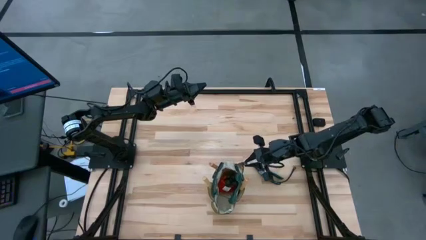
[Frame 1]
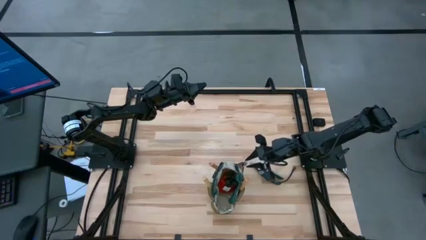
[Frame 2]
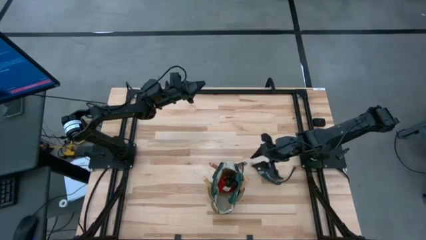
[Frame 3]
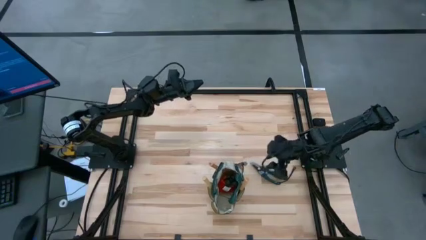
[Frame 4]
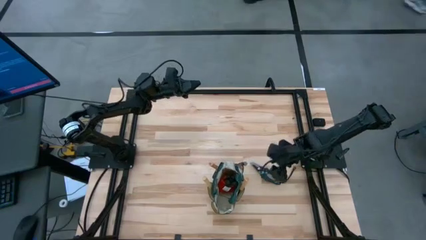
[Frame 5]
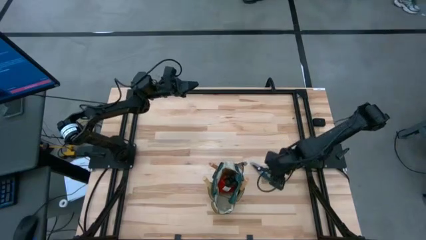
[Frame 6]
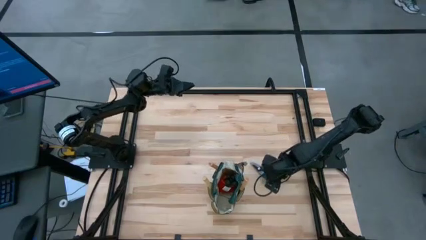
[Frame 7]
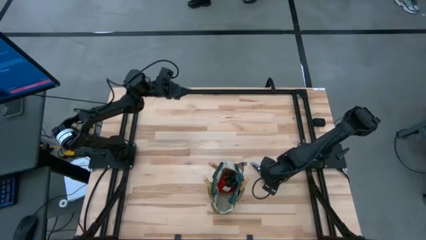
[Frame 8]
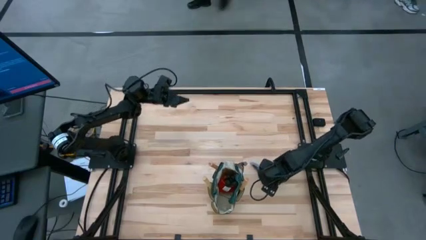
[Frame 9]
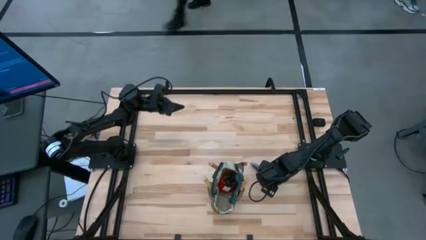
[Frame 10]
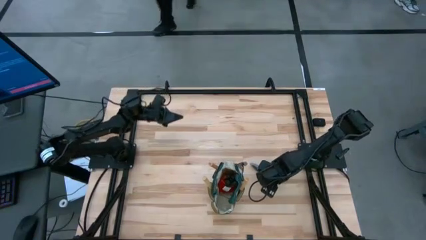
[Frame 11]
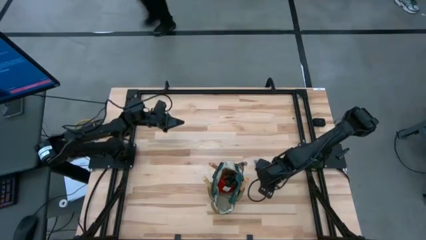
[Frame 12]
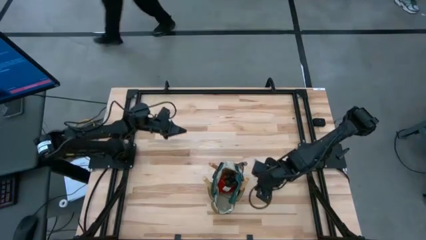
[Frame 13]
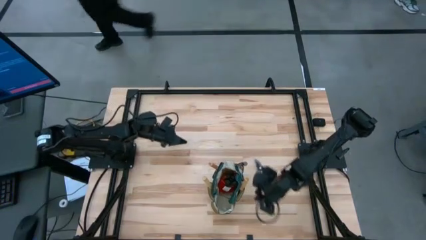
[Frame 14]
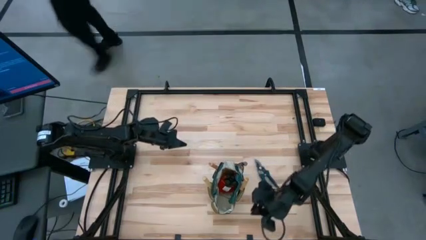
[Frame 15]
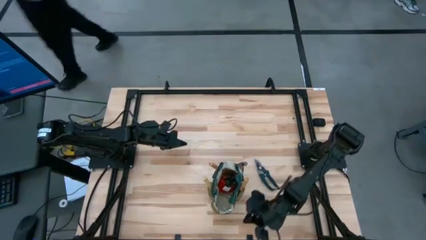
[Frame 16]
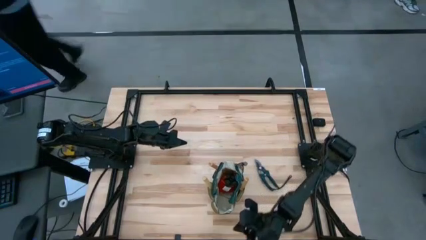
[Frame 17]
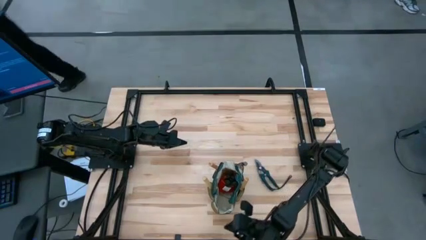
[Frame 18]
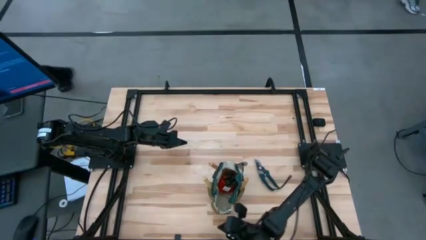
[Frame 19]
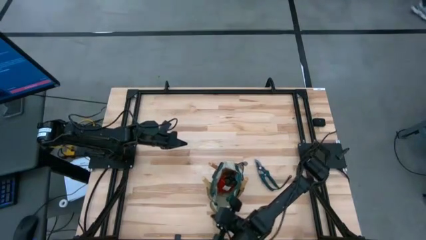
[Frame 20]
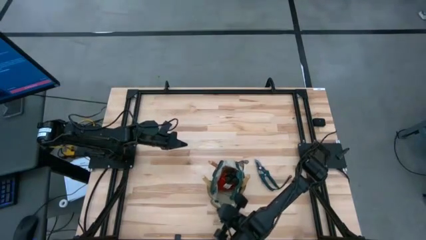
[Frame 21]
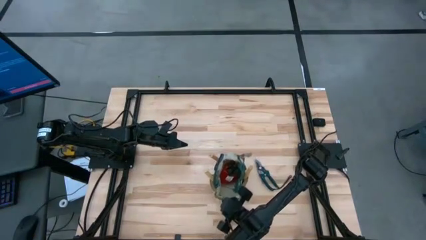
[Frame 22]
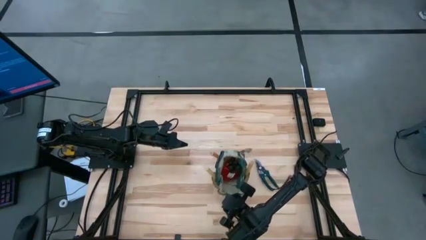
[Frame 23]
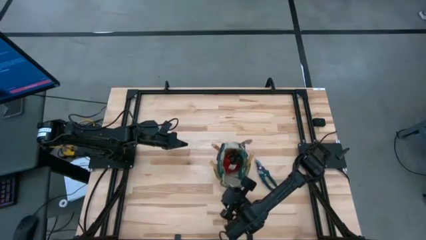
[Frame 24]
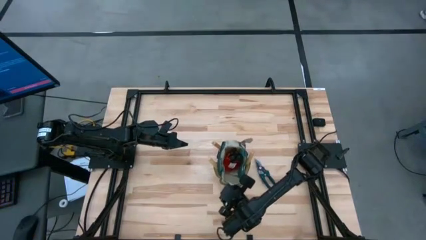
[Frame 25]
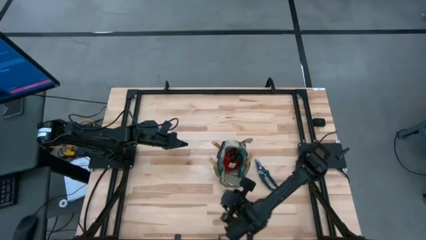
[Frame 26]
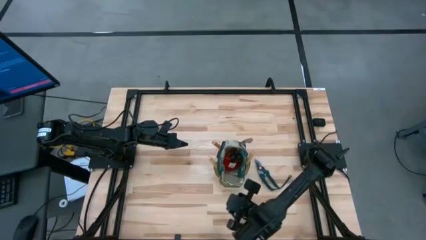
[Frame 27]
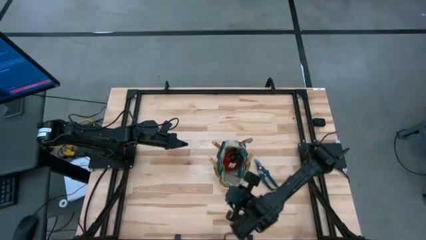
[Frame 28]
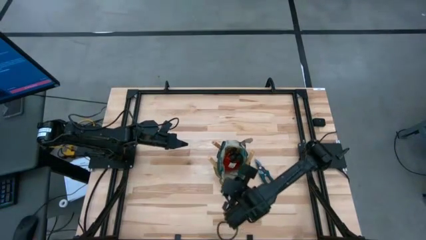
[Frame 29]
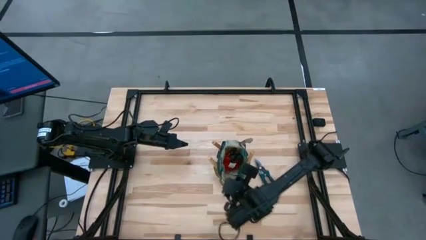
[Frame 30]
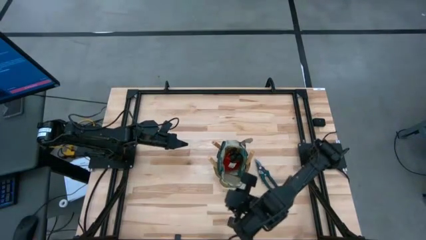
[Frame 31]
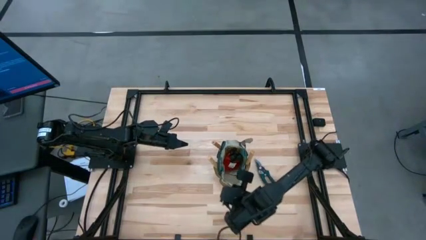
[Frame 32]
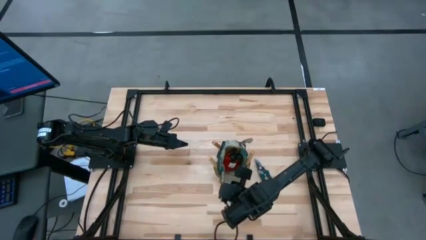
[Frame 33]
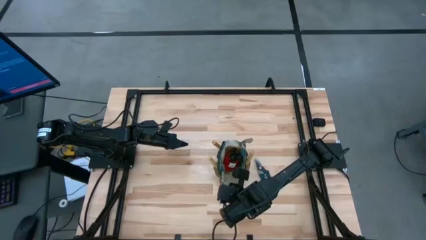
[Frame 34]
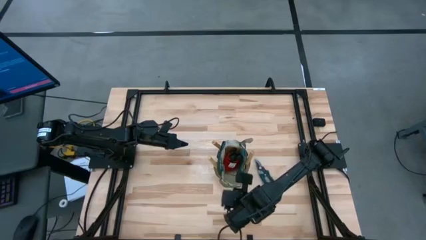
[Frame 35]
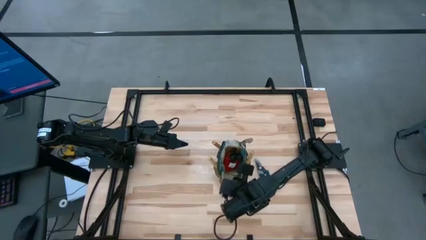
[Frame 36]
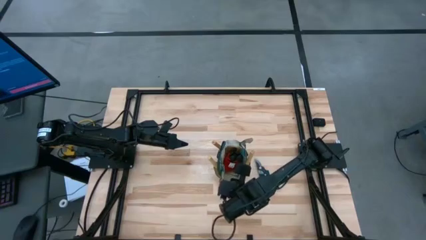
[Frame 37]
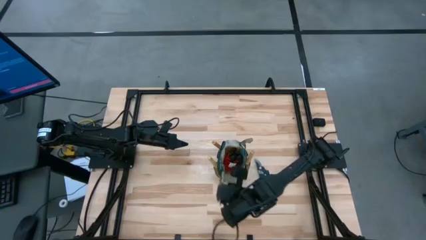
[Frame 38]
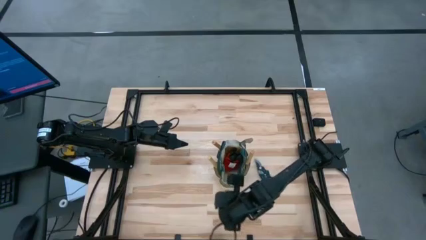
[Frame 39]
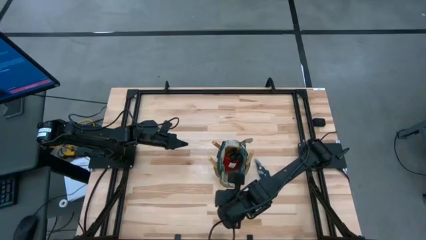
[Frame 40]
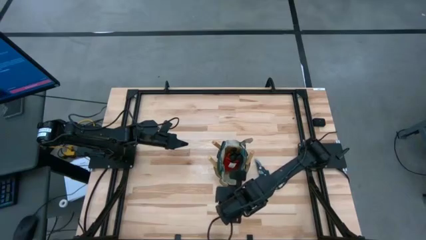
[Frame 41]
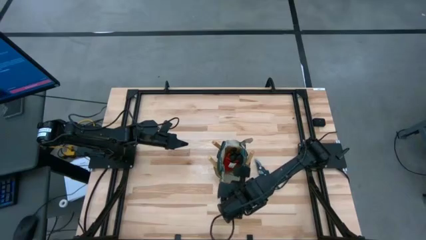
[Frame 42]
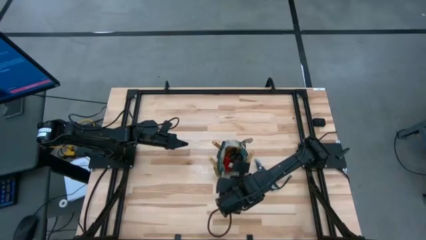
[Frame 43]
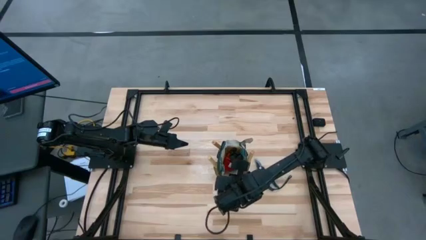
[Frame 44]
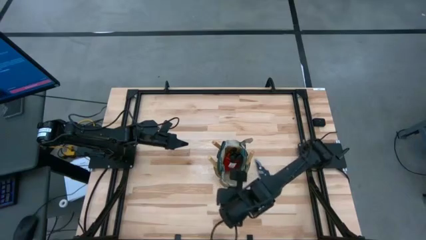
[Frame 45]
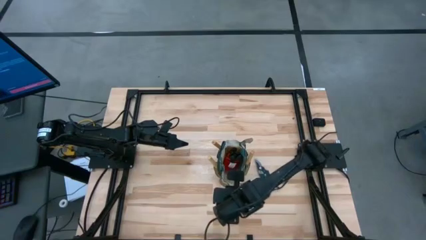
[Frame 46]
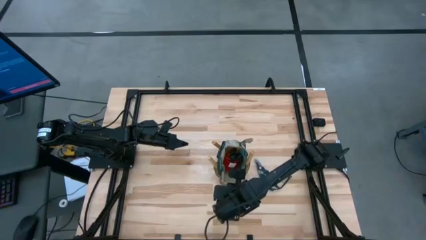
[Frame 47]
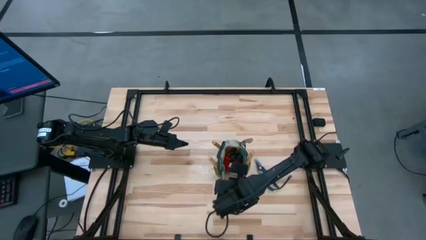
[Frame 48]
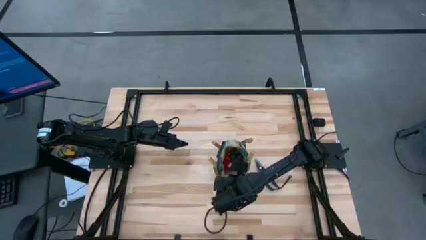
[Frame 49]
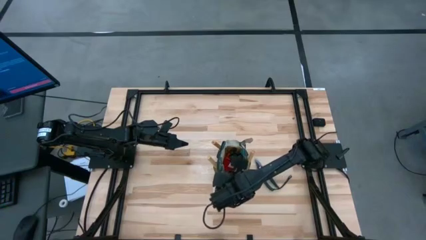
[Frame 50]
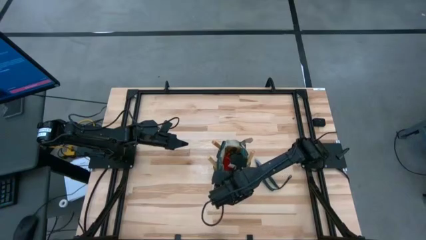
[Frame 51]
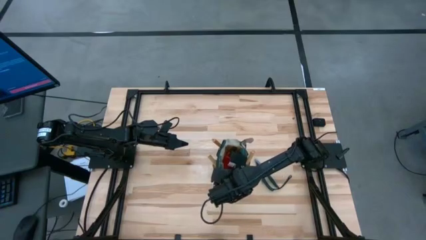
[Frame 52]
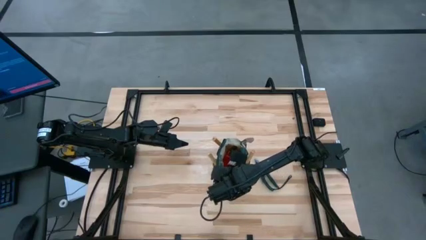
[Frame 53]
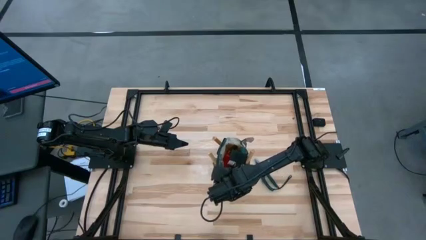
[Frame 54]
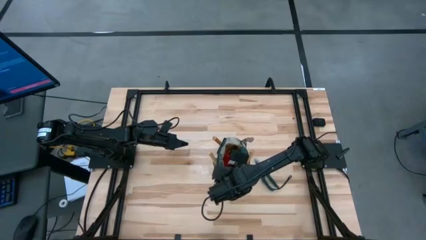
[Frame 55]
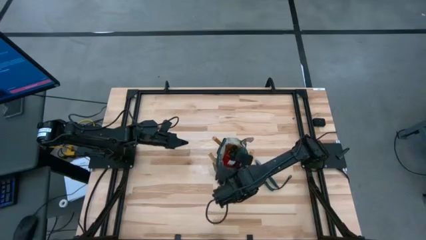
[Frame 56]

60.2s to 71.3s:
Task: Pick & Place Garden tools in Gardening bag
Adjust the green gardening bag

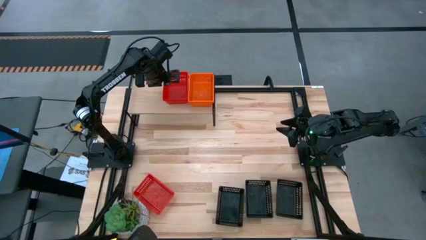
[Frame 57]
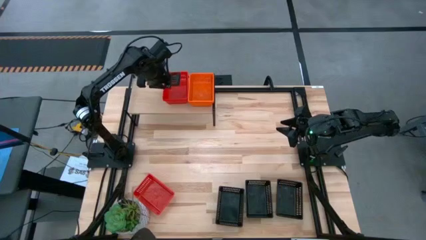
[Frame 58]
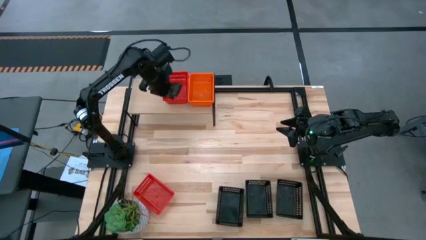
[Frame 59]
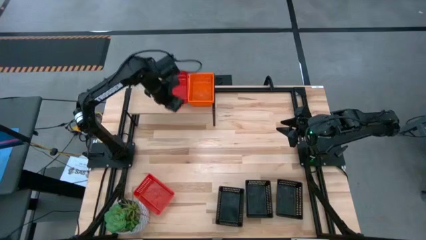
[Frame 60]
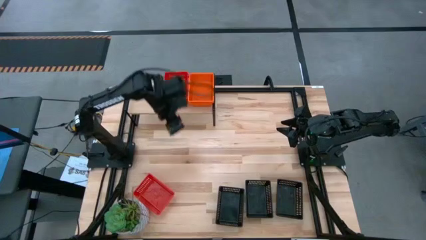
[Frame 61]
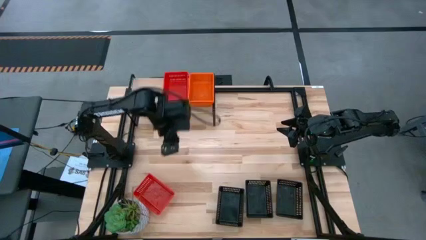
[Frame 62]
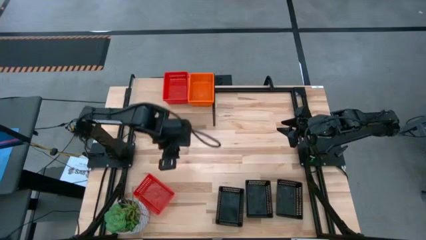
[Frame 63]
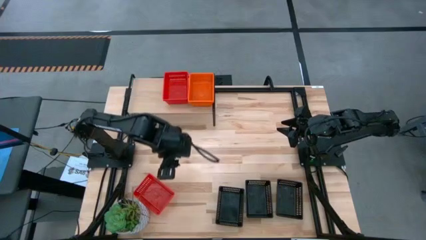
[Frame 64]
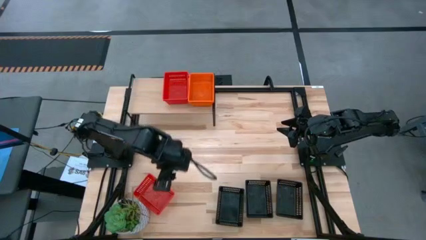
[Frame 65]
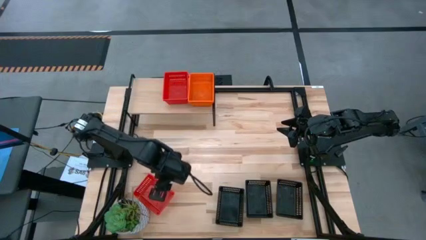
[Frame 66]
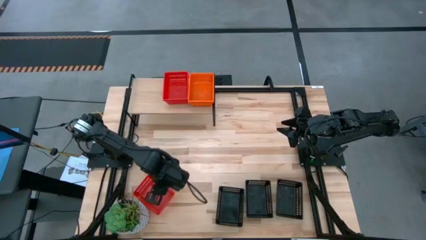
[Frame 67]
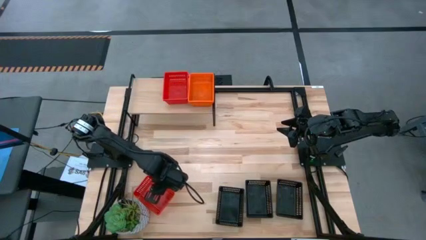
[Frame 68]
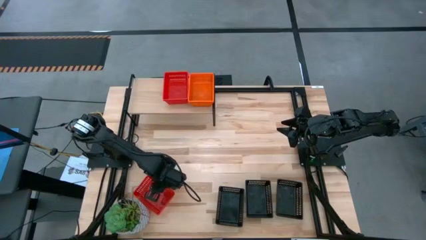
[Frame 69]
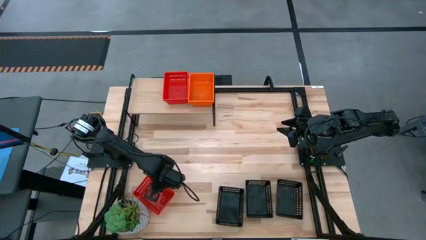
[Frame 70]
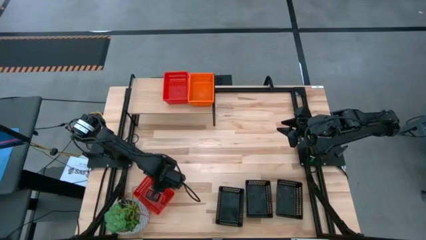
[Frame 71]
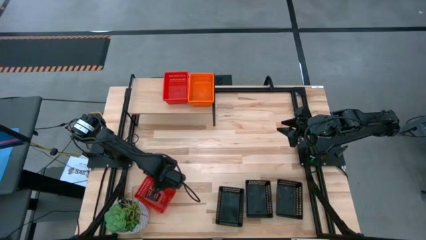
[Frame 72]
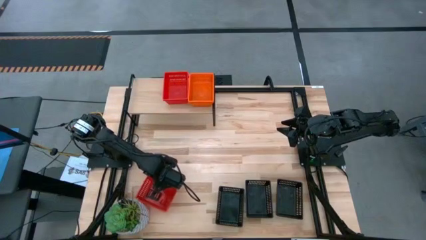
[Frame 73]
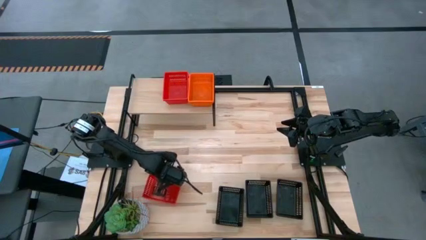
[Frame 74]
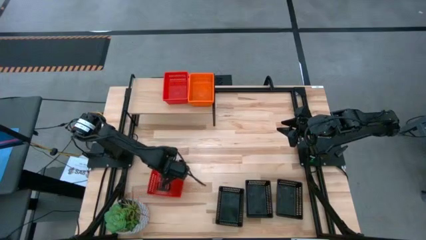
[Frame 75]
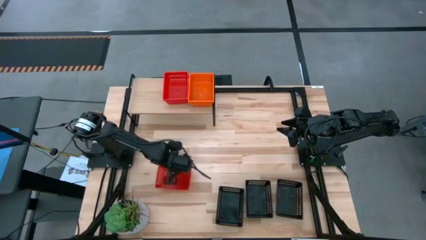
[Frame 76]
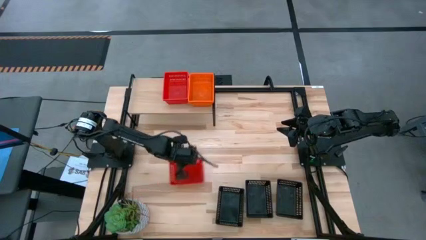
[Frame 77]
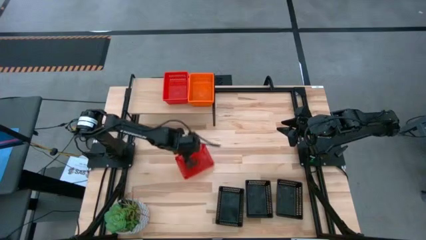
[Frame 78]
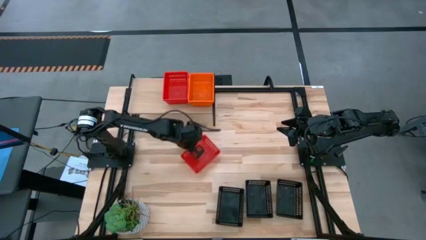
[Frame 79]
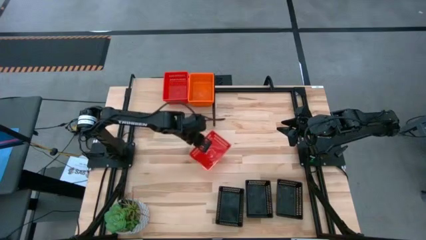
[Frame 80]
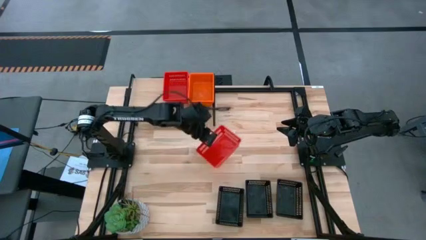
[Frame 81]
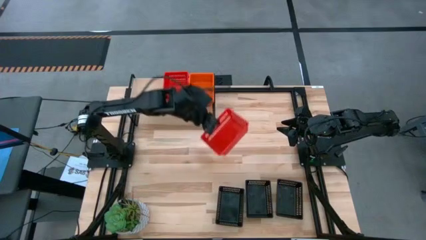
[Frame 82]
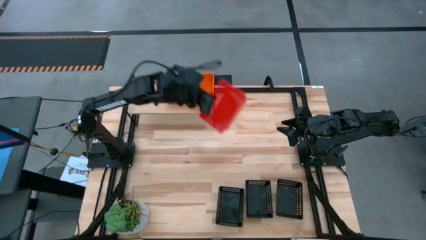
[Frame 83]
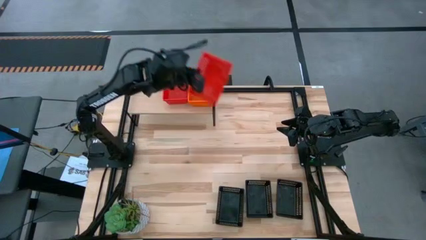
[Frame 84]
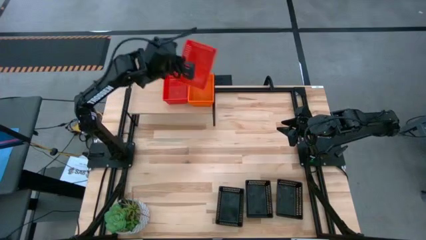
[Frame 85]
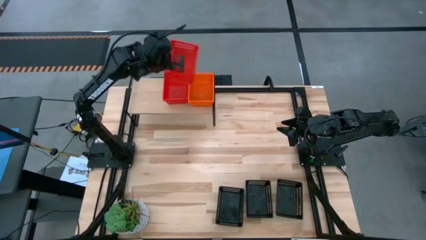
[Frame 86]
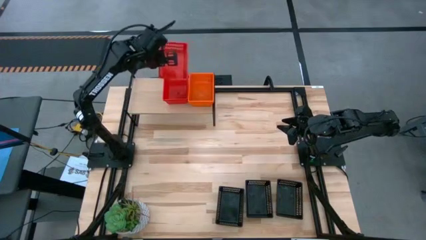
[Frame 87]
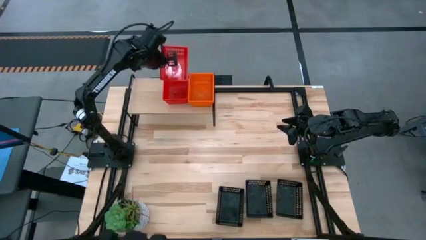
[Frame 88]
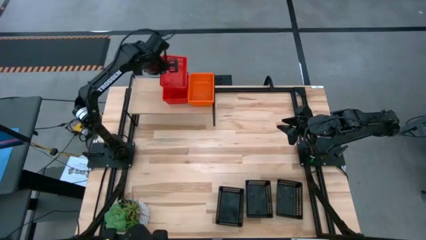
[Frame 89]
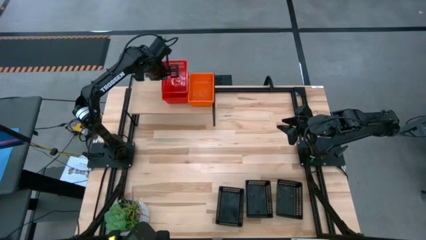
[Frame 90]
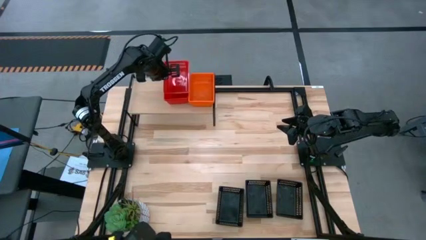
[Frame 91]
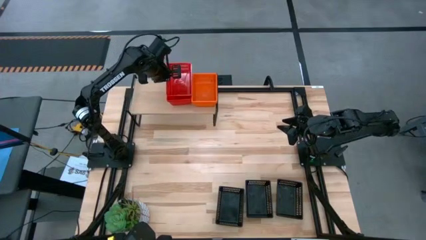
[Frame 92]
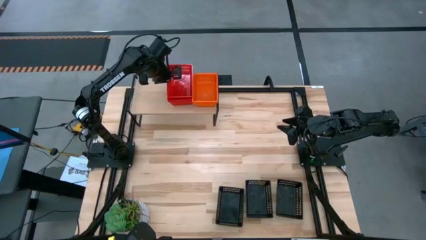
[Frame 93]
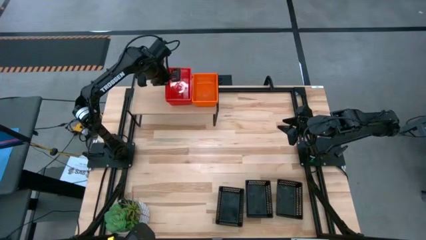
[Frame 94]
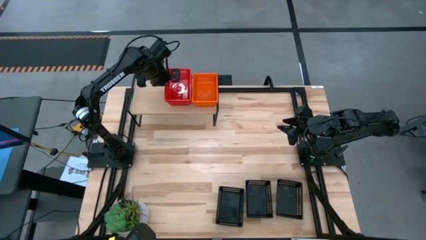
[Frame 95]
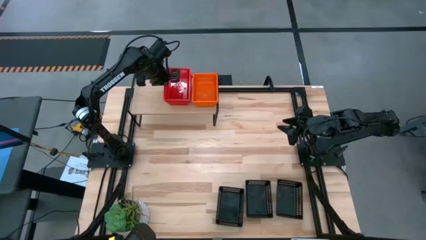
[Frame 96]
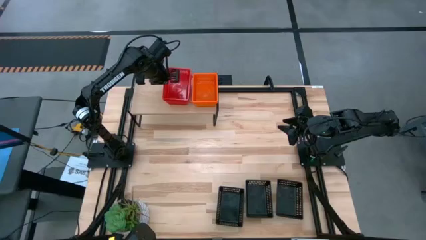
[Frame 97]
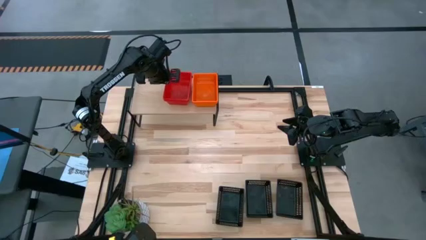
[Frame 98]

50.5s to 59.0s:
Task: Stack baskets on shelf by color
Stack the red bin on top of the other red bins on the shelf
